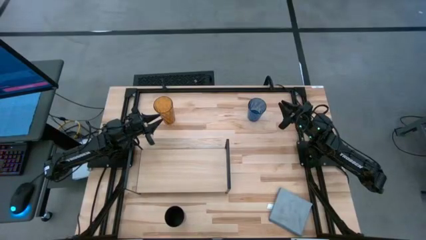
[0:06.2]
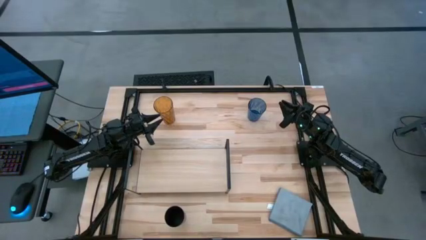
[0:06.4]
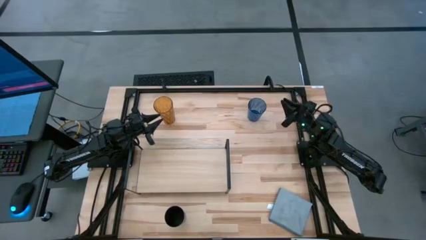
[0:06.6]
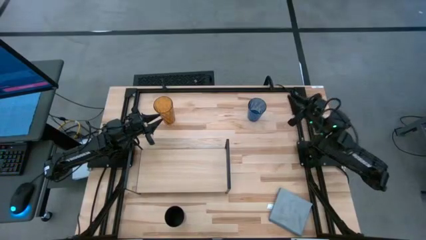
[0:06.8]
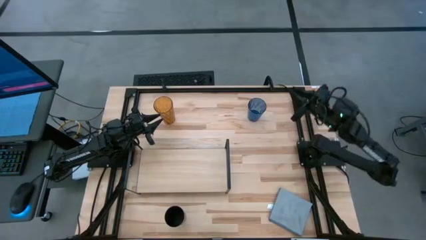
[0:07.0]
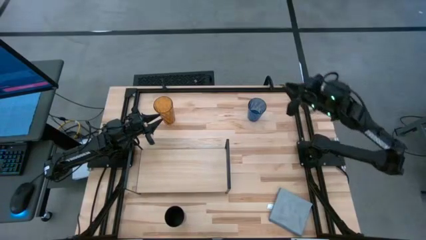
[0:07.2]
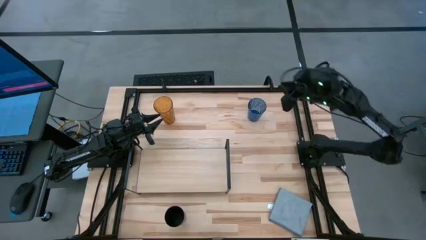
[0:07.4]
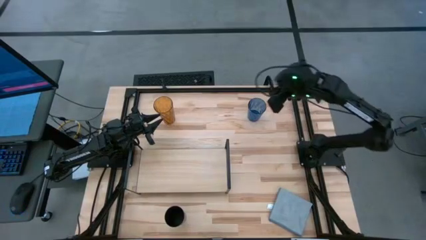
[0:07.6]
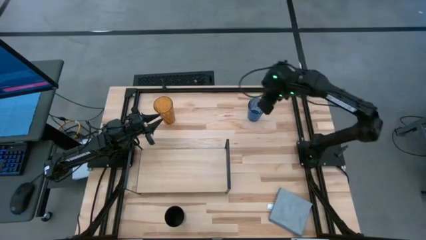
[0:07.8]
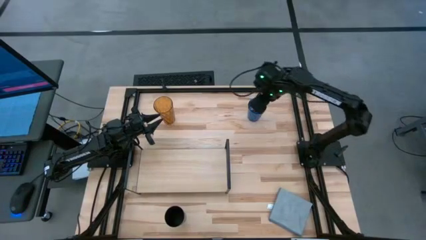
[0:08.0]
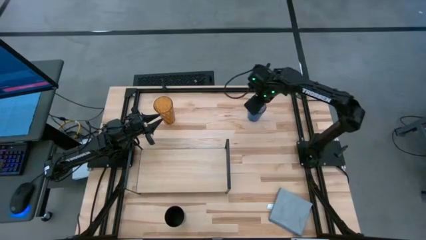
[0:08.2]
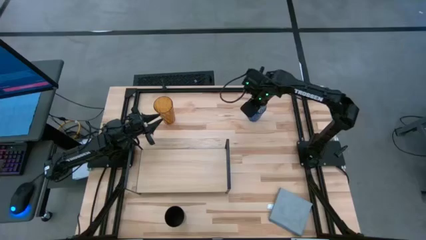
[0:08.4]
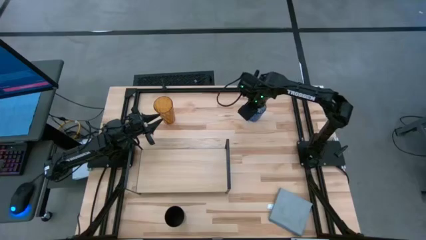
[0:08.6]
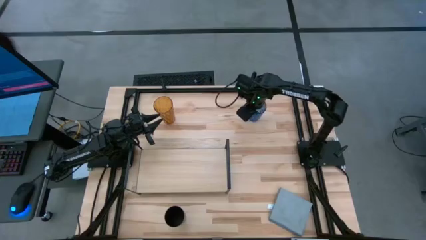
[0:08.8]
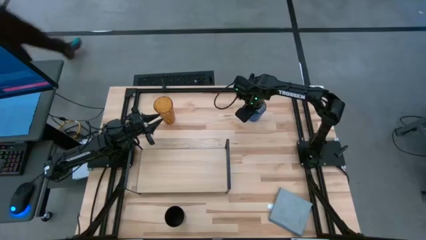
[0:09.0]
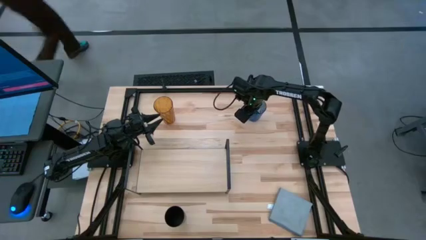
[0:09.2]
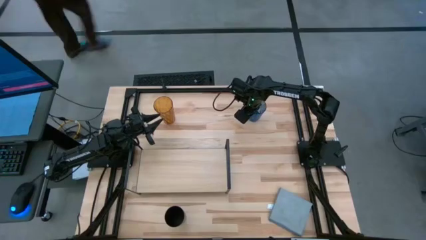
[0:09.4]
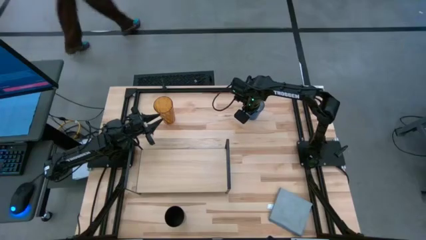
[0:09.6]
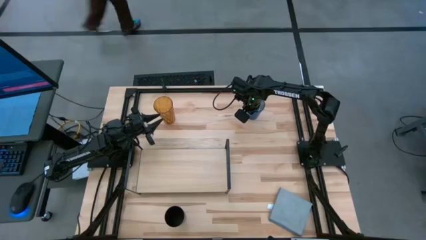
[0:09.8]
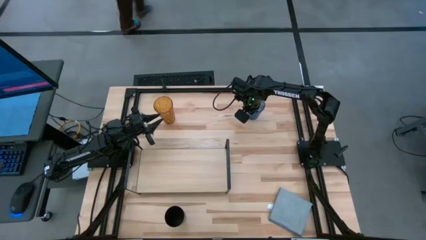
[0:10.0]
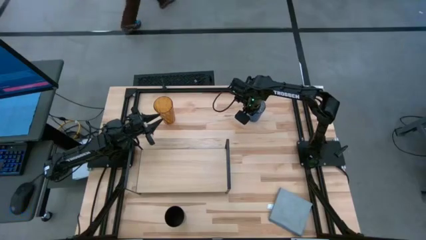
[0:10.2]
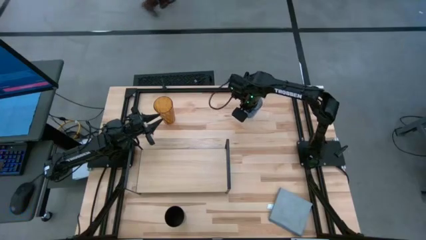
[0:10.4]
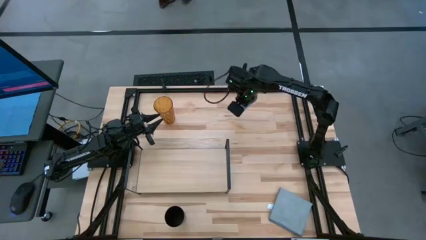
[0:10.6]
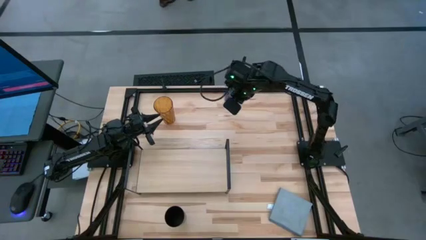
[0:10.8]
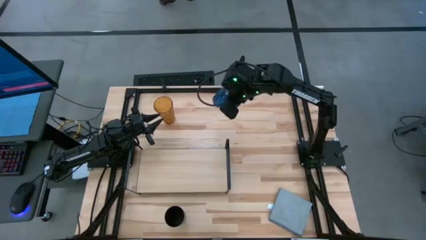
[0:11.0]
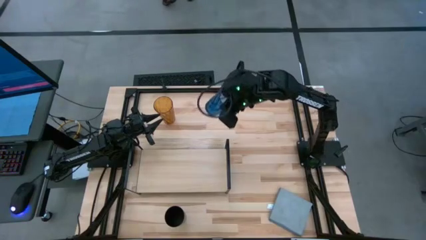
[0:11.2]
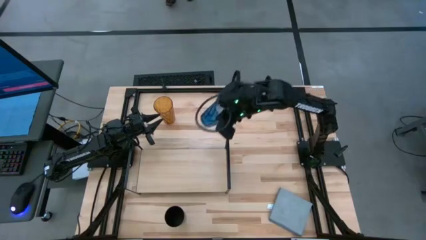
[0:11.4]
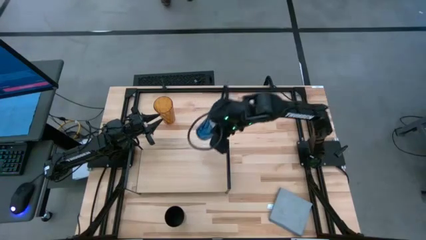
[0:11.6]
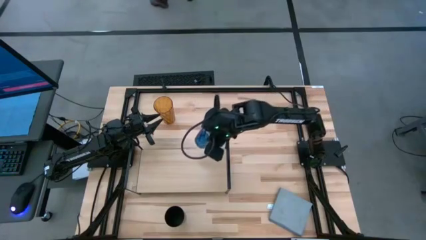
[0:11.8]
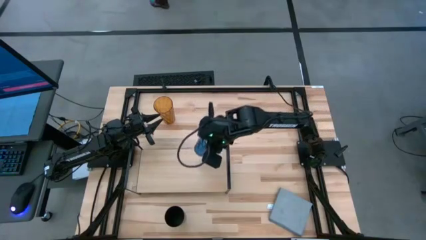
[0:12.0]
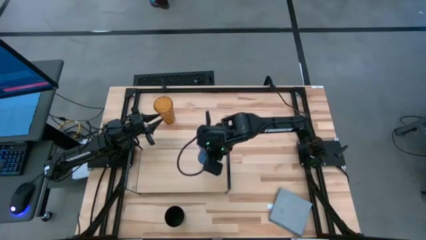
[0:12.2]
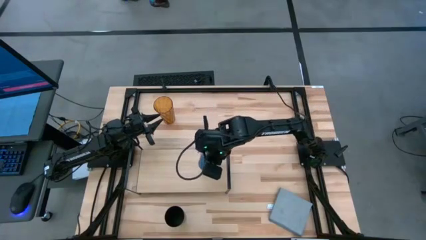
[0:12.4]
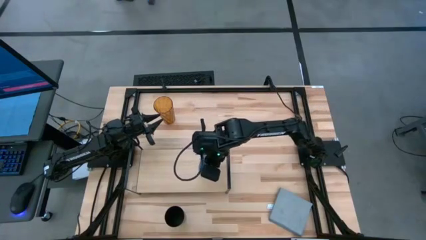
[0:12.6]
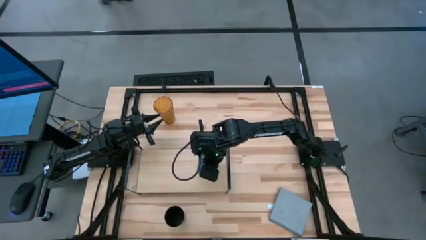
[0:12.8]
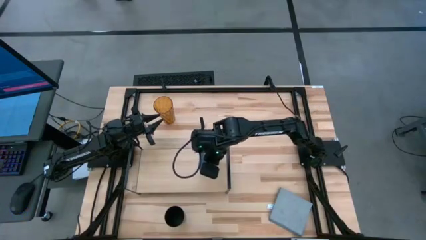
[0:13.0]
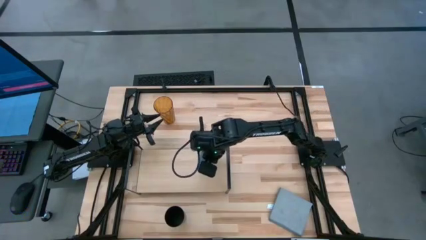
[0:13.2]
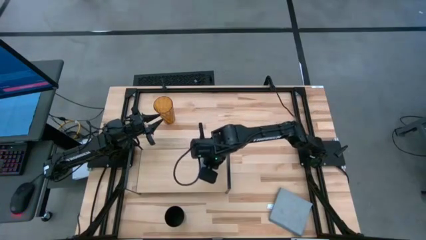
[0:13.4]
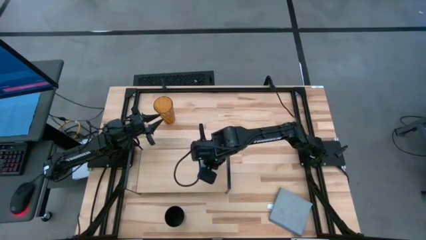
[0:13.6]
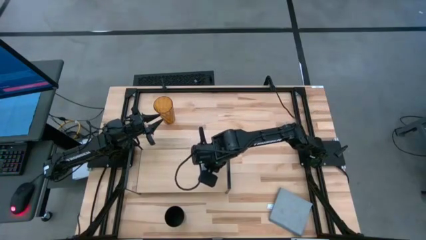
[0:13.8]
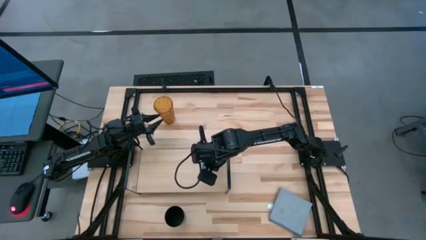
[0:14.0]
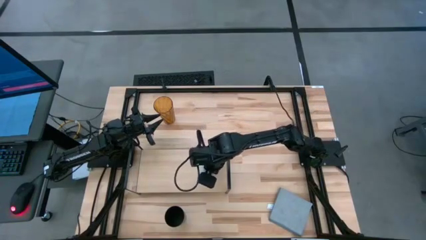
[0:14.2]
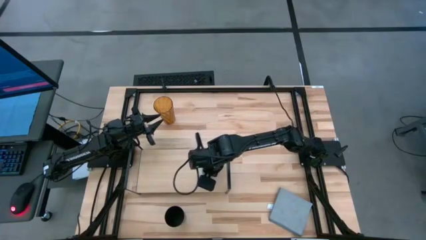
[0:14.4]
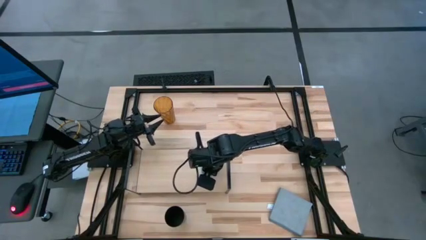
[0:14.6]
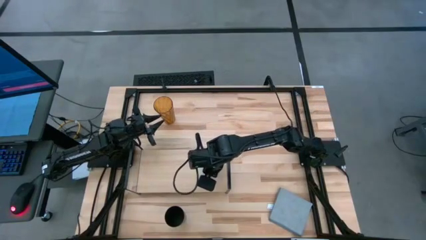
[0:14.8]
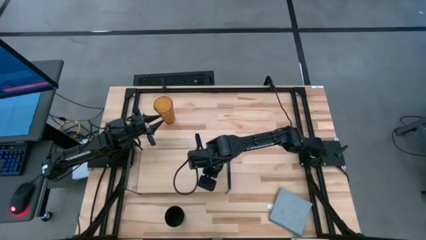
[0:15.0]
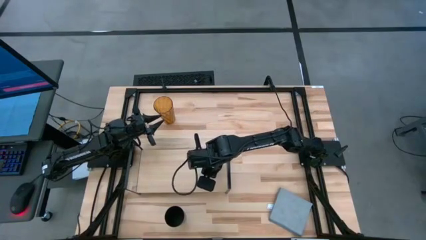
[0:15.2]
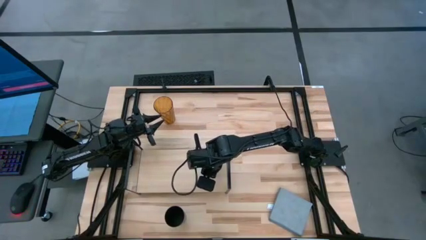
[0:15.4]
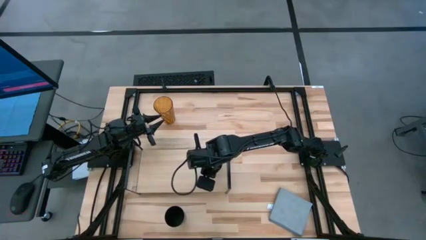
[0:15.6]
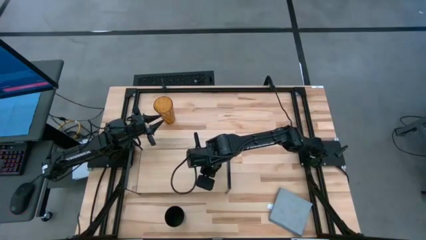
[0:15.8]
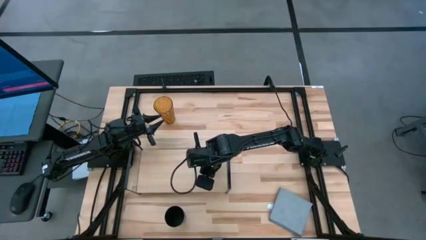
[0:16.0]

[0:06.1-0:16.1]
Task: Stack small to large cups/mugs on shelf
Put the blue cup on the shelf
